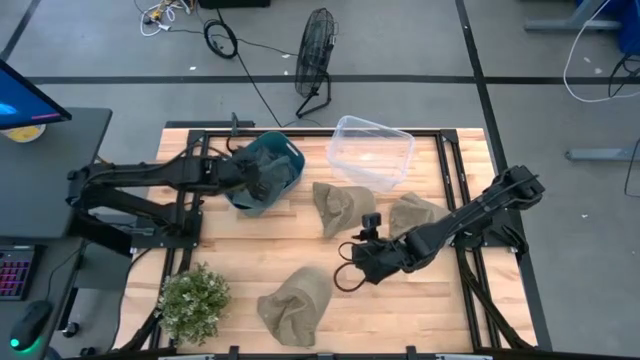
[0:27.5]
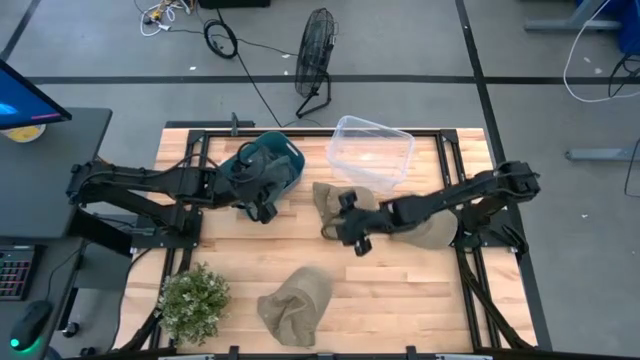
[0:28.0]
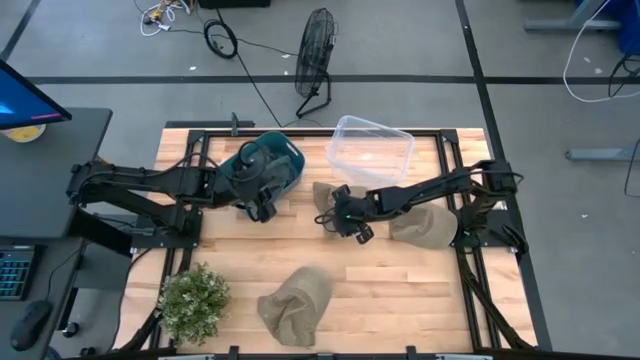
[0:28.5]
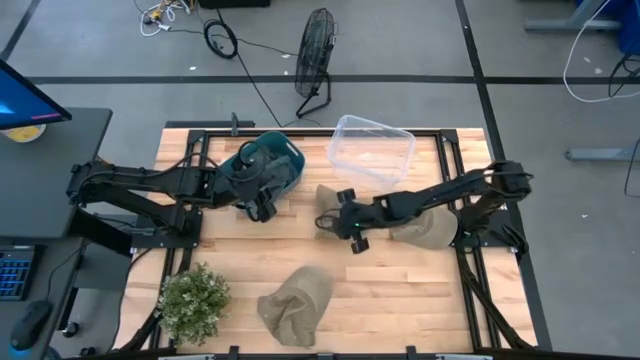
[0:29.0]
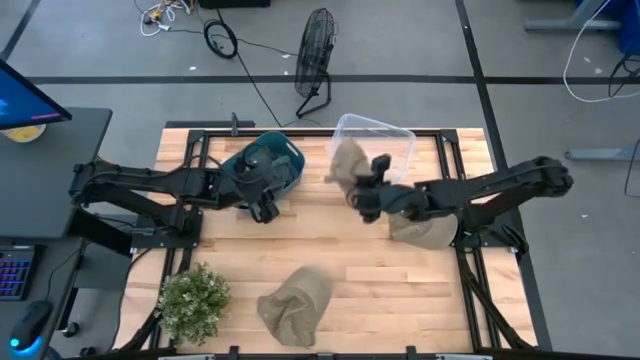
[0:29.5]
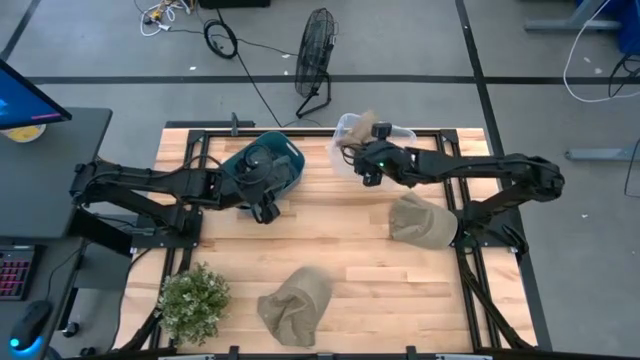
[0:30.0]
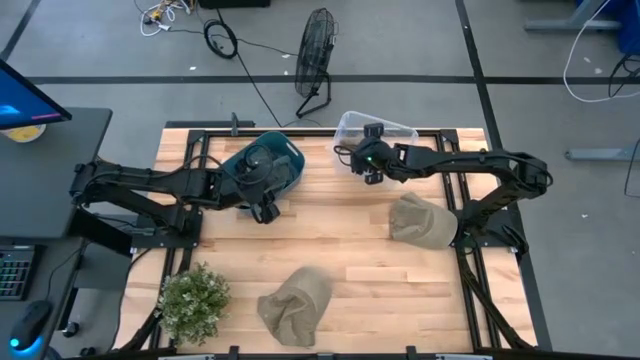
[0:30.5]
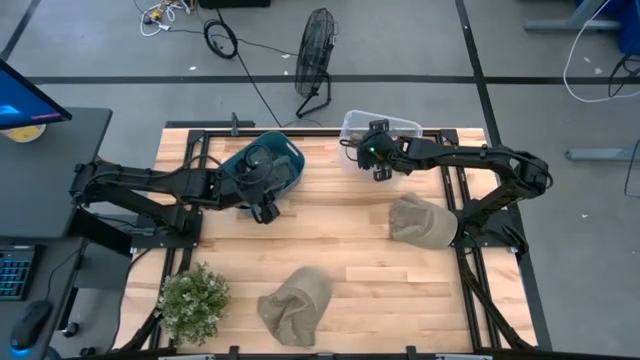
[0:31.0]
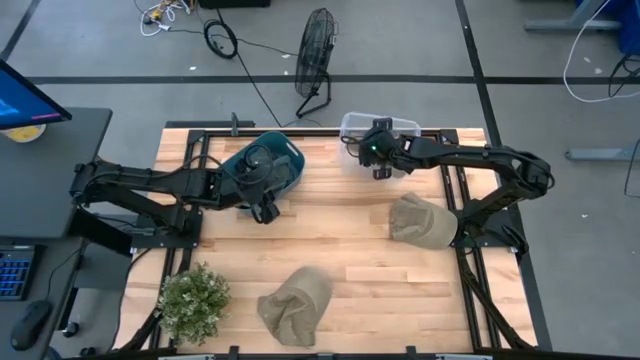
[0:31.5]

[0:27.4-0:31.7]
Task: Pick & Place hat
Put the top left brown cap into the transparent bin

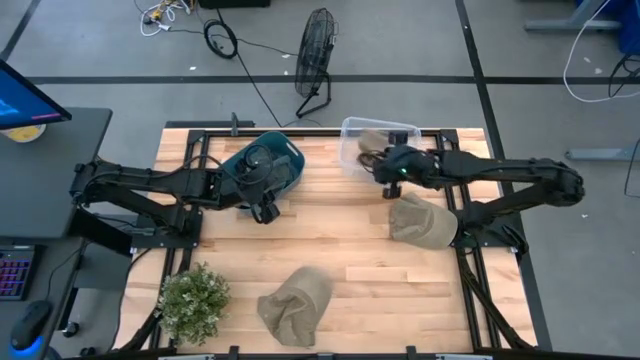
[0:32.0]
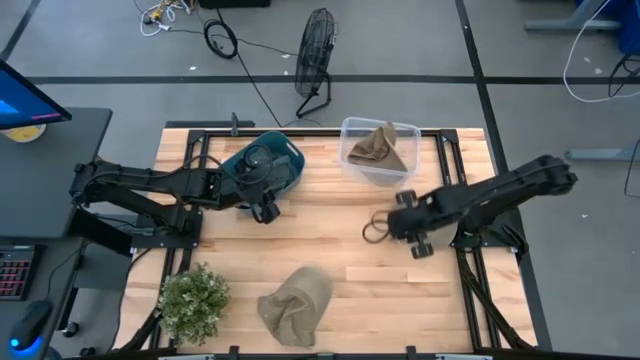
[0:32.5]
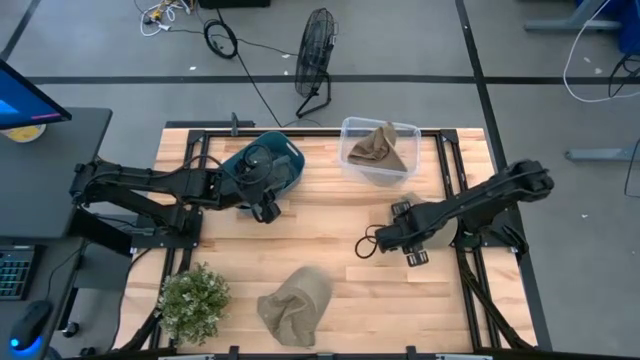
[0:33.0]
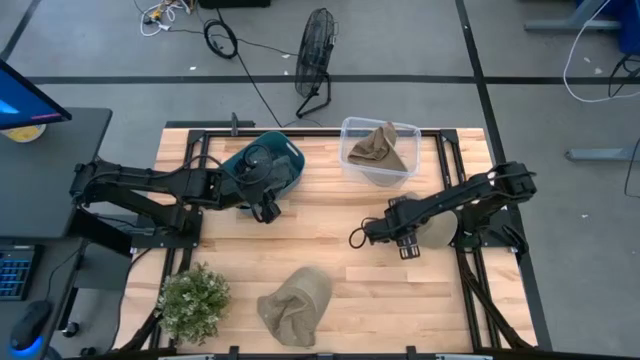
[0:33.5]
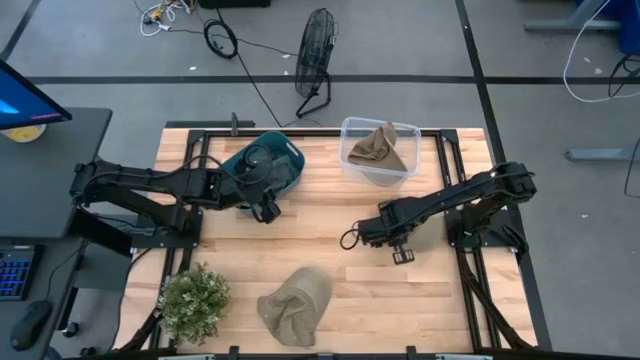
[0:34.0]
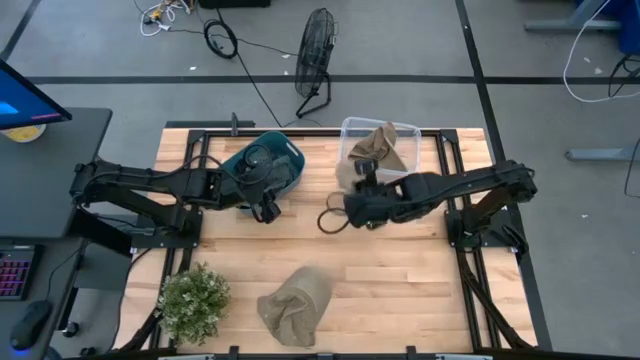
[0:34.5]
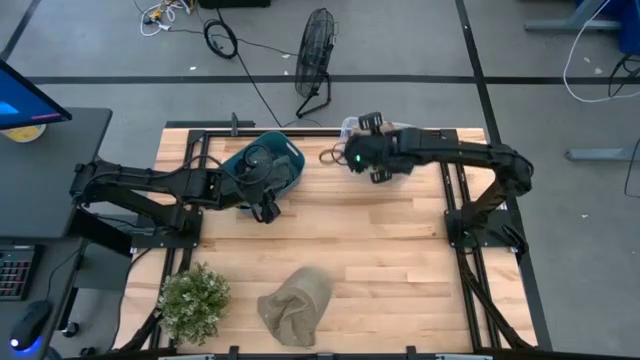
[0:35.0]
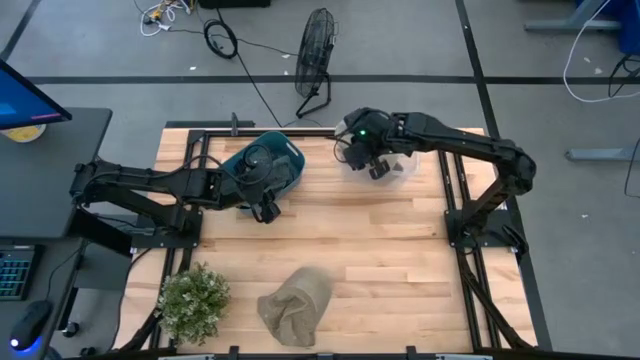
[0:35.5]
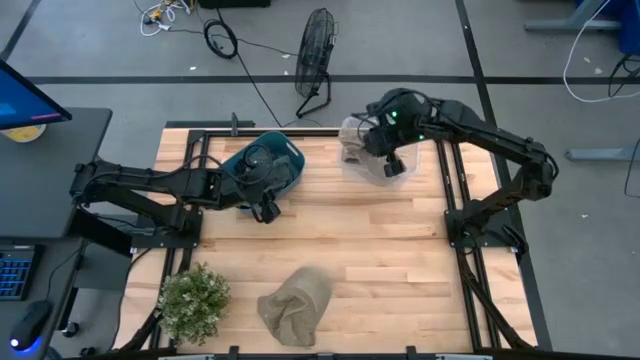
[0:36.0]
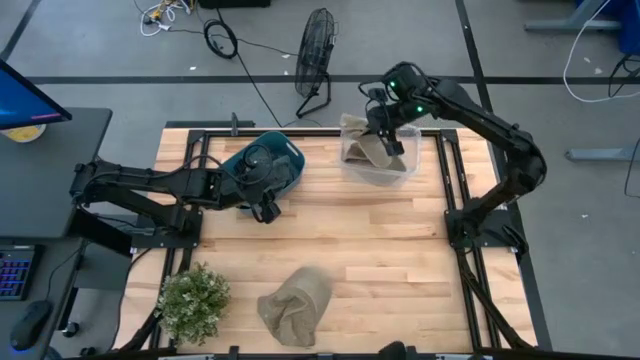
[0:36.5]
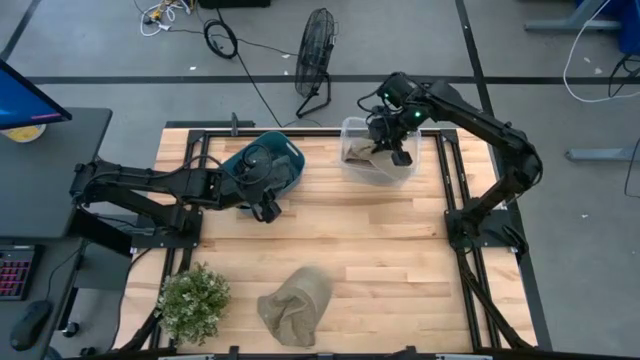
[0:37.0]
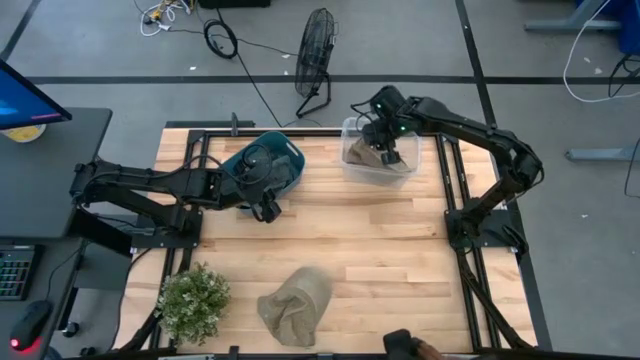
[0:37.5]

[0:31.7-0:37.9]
Put the top brown cap into the transparent bin

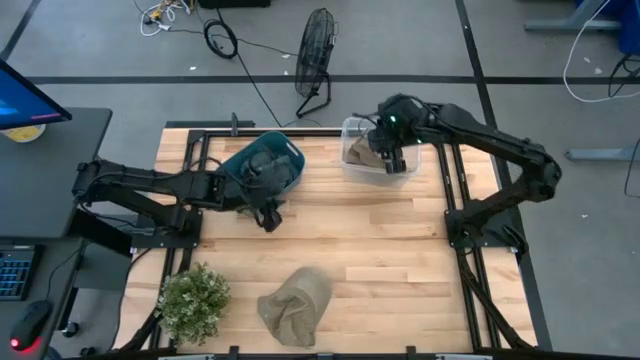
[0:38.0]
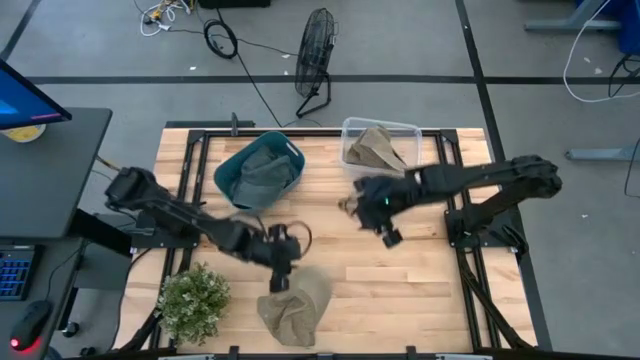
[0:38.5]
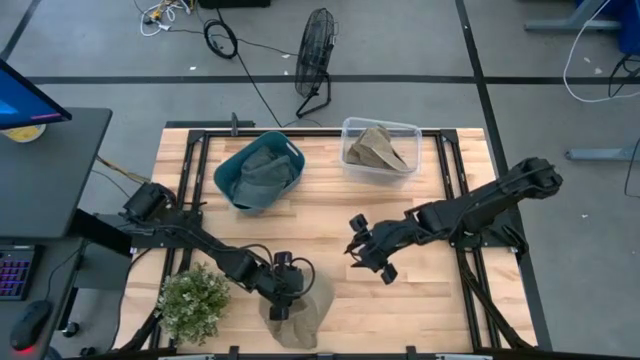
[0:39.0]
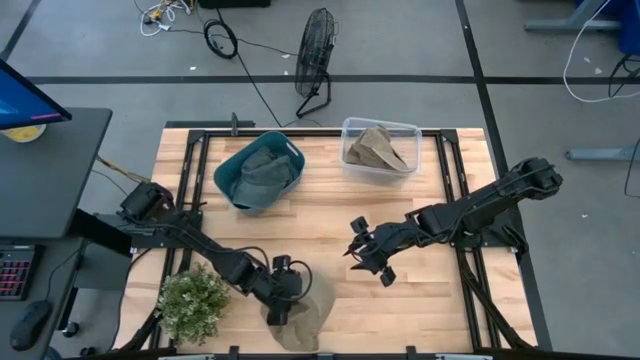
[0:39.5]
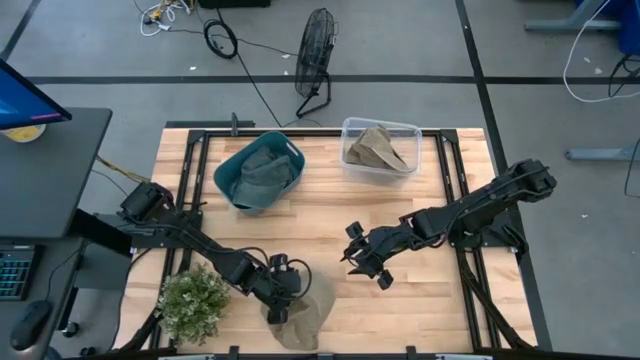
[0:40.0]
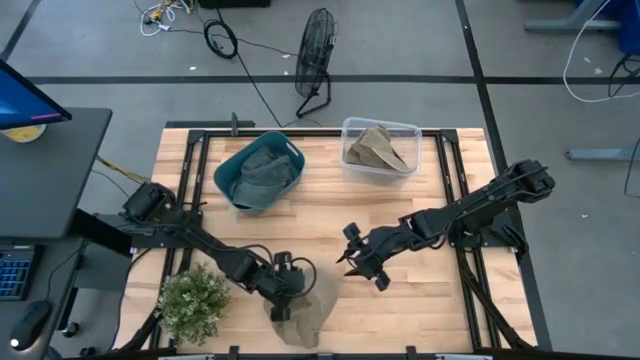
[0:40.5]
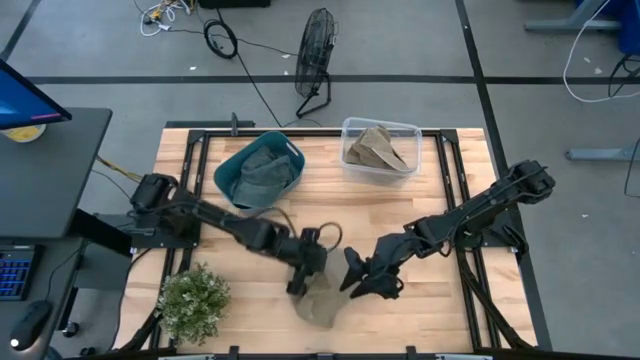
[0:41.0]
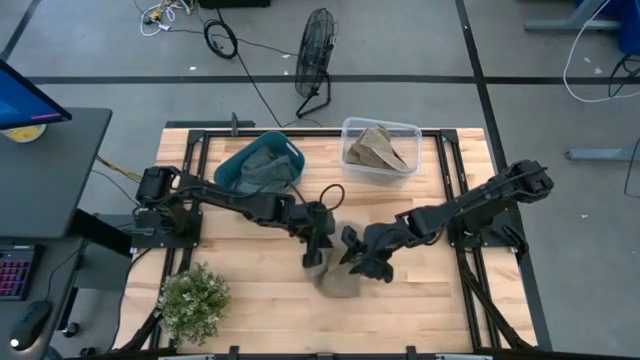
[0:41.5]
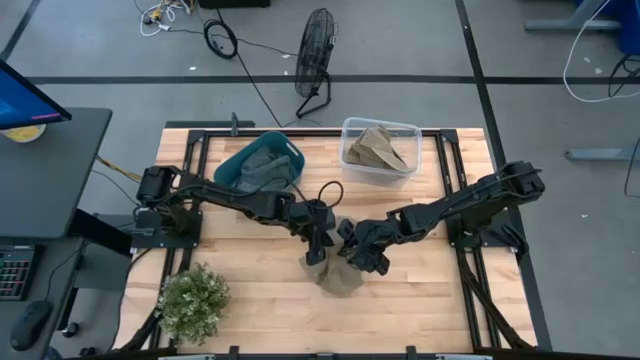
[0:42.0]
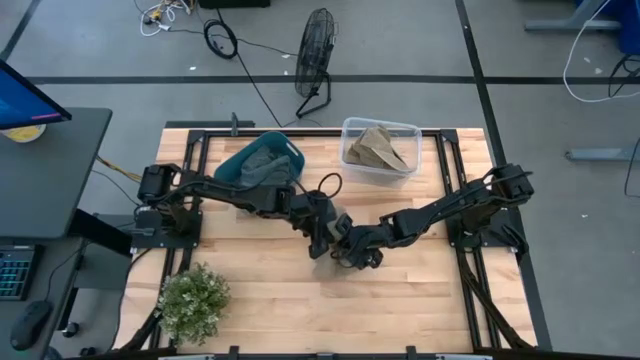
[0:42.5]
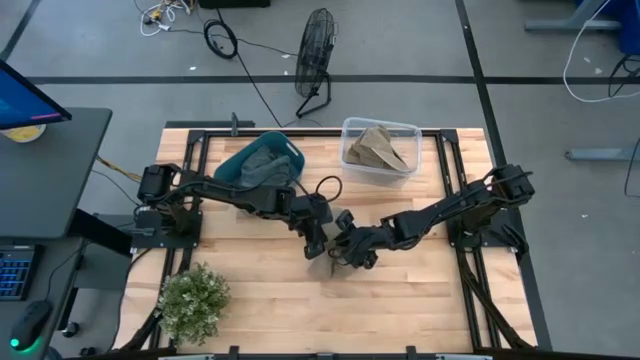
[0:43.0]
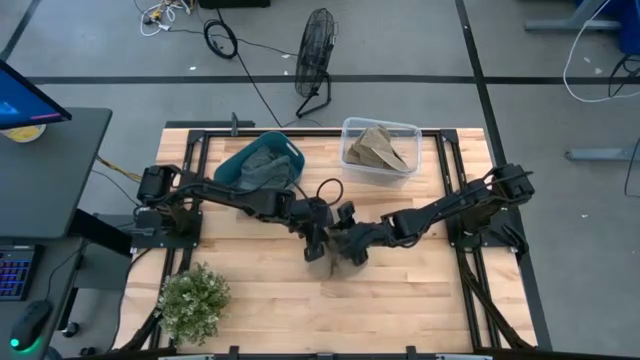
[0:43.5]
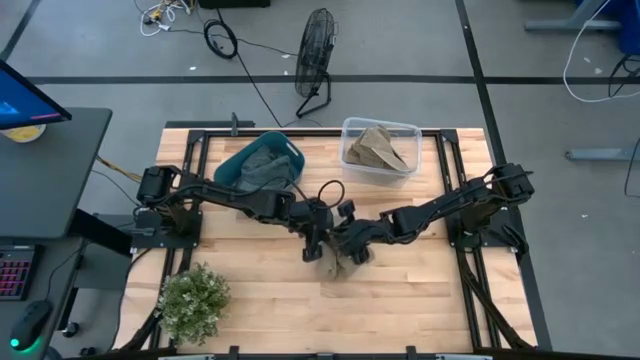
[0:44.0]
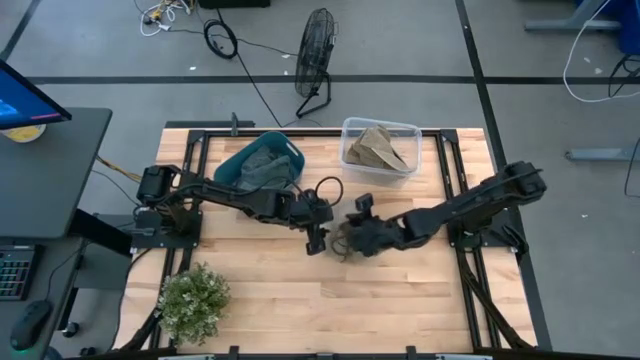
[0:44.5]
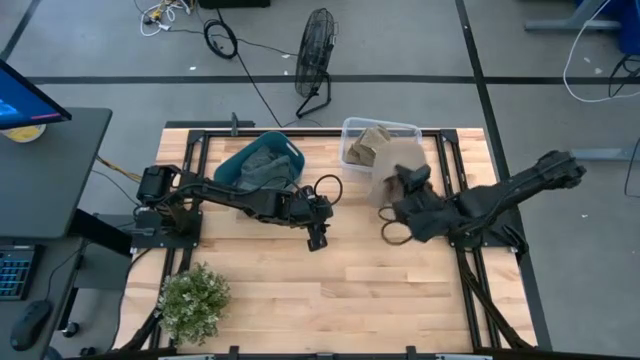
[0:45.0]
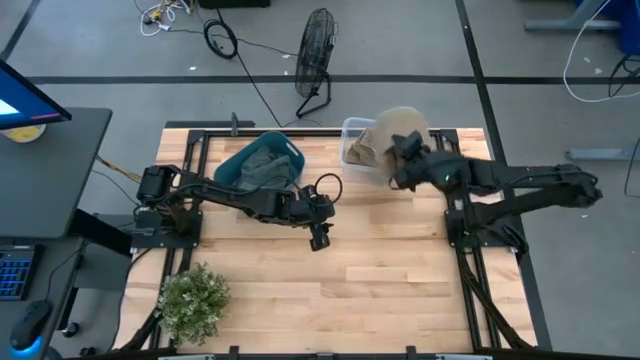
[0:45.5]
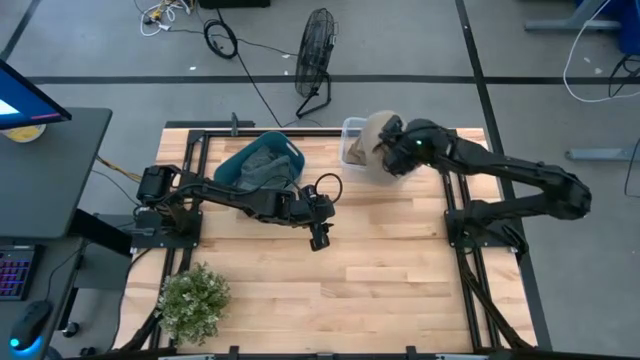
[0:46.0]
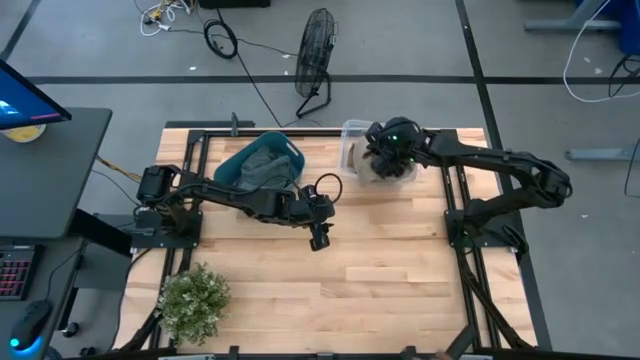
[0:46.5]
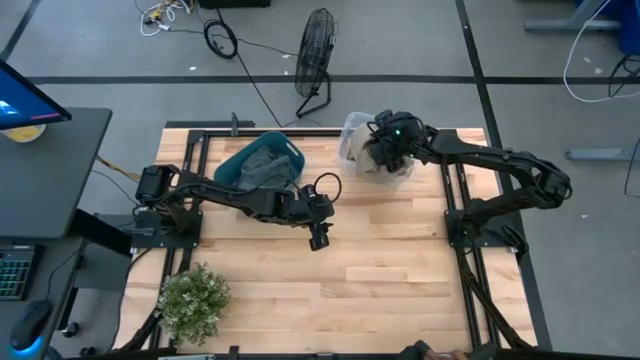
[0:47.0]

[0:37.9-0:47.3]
Put the brown cap into the transparent bin

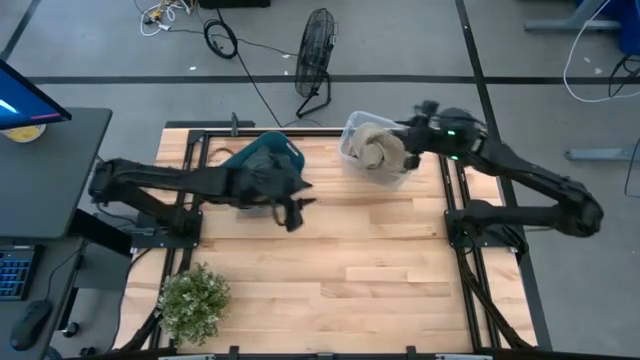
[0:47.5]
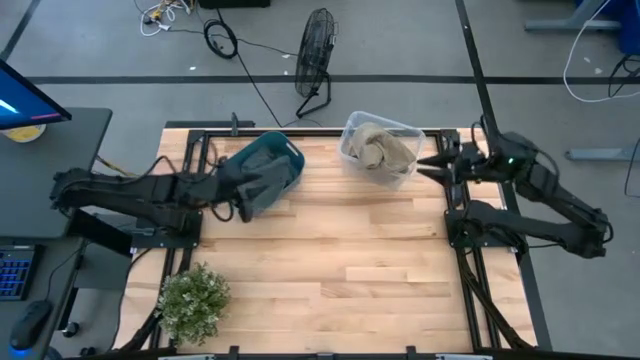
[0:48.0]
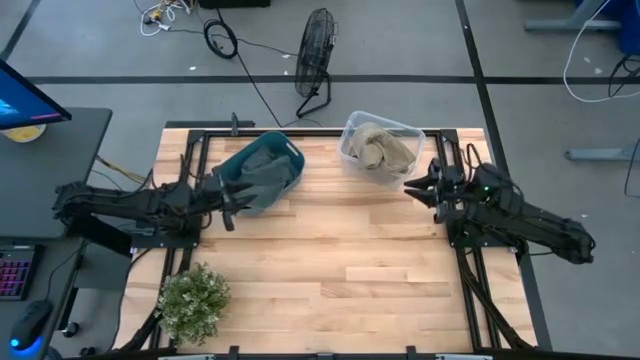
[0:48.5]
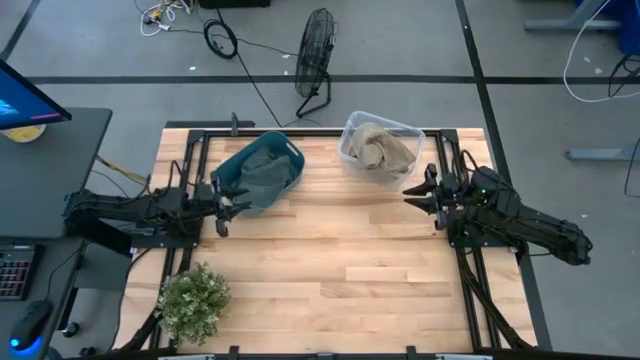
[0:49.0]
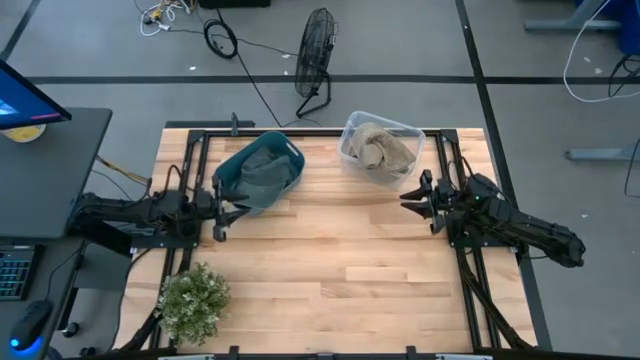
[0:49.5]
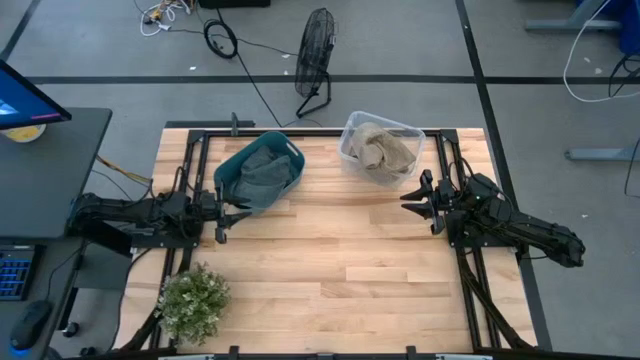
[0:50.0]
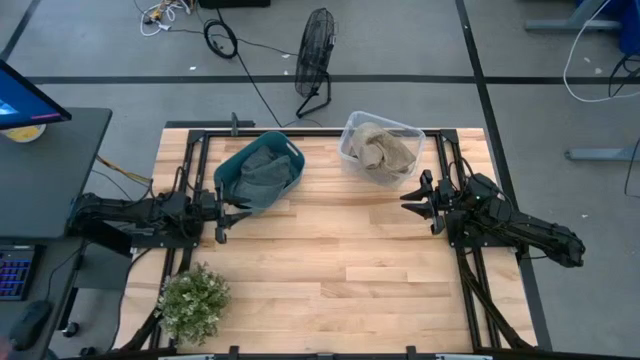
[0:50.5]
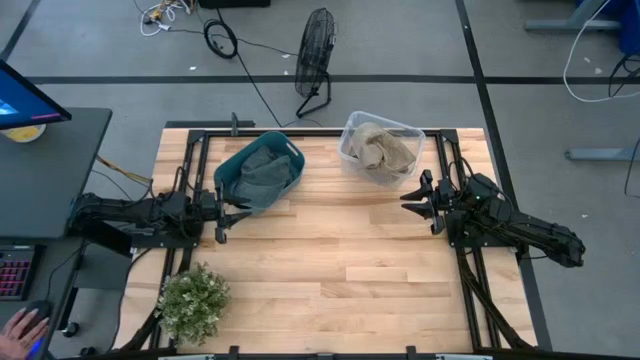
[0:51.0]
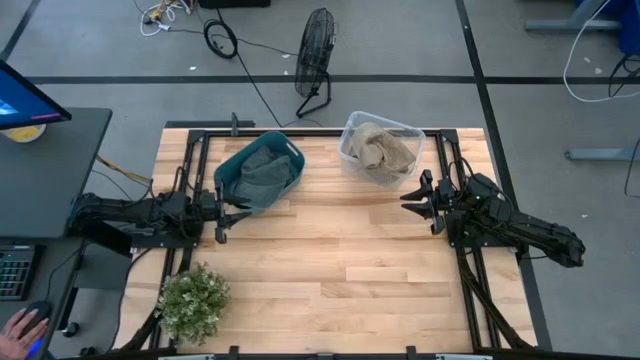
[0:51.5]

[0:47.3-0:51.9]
Return to Home Position
